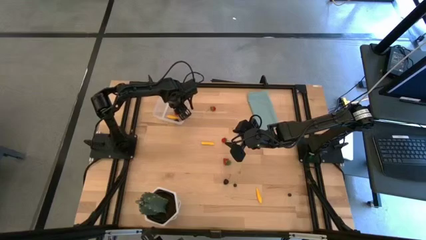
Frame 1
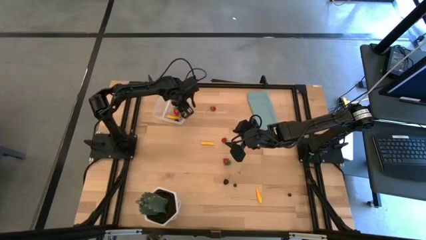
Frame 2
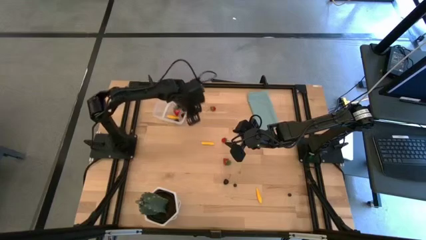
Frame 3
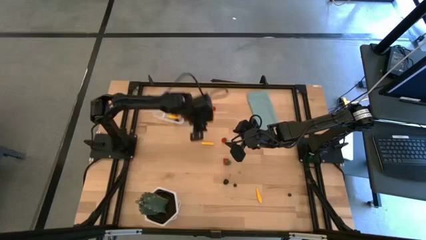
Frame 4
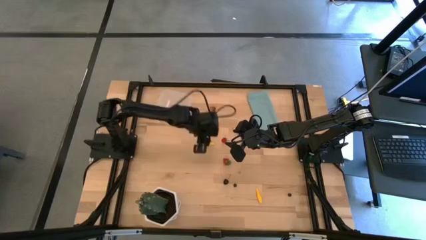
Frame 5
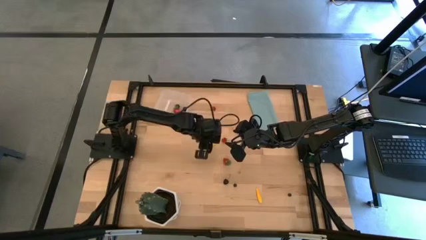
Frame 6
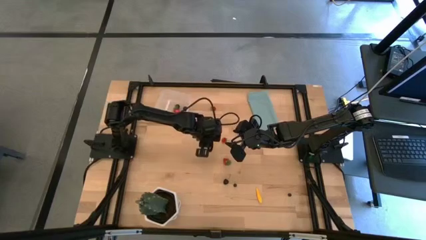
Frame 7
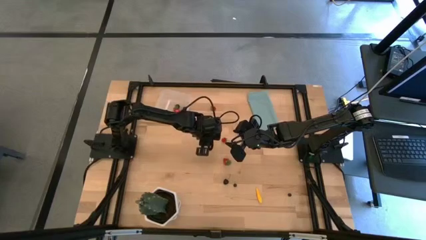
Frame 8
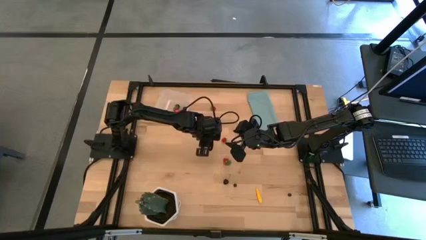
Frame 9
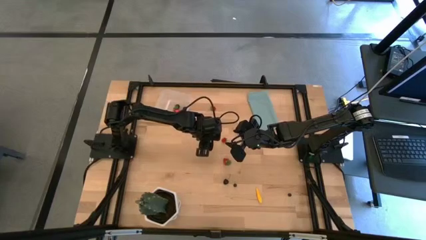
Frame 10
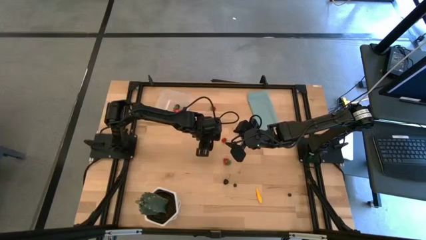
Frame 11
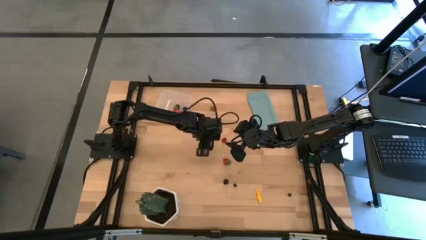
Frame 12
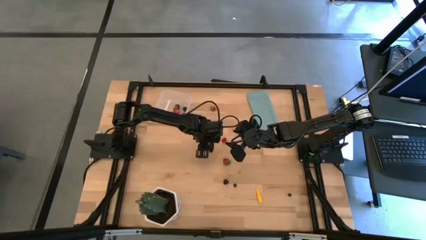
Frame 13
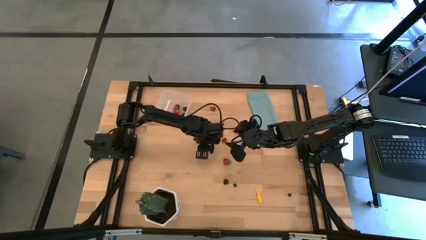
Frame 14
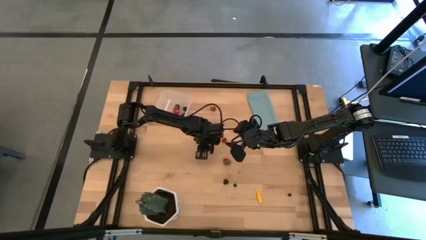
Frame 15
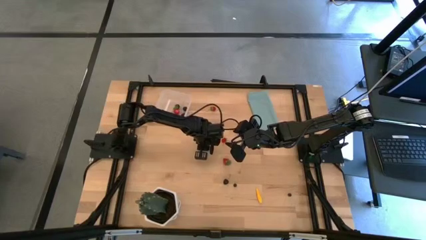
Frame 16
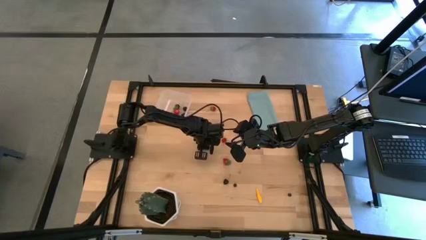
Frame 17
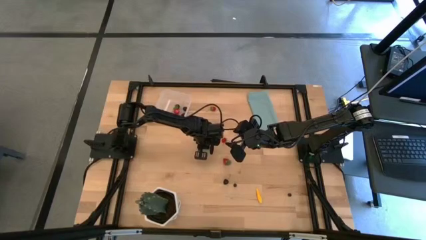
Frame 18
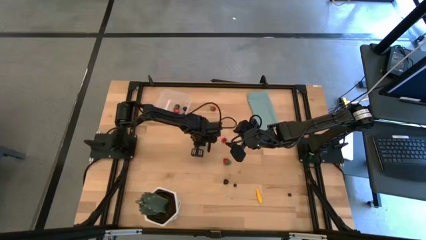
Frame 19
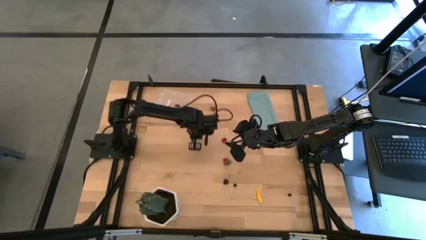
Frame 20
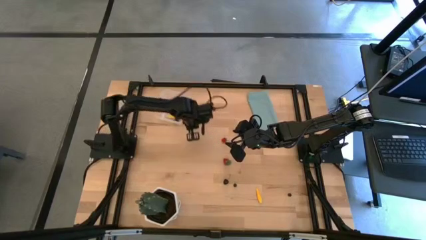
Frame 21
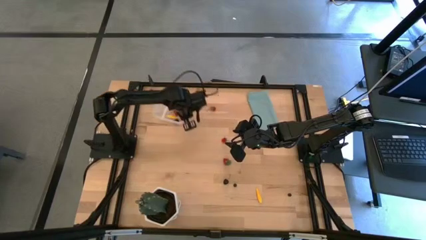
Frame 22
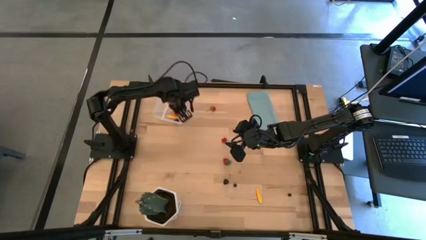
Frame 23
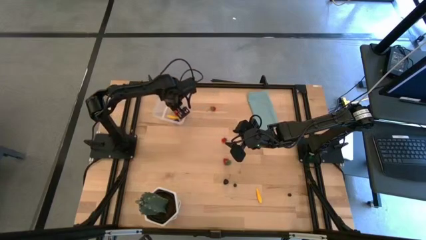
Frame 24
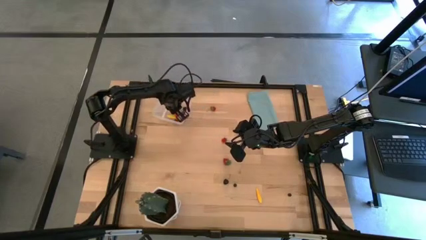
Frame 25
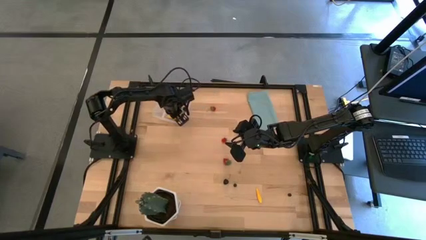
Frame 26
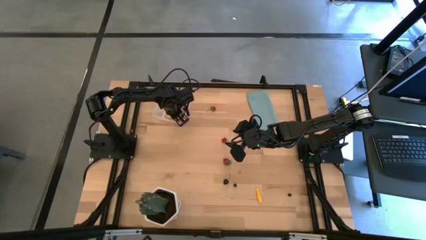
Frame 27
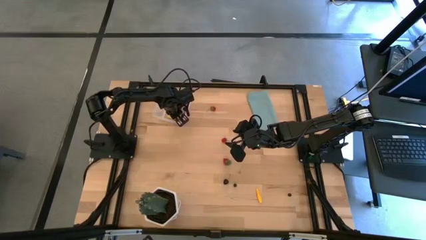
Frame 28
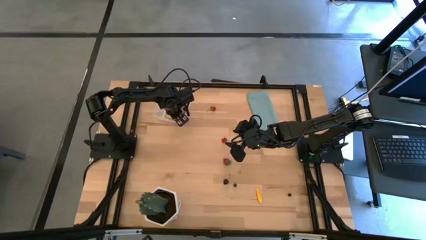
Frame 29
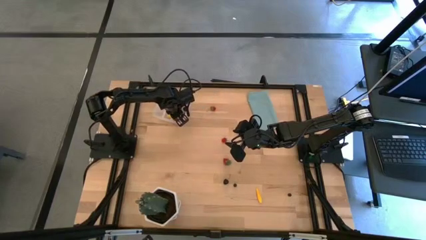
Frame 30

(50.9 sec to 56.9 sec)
Task: Pick and placing Produce into tupperware
Put the yellow corn into the transparent bin

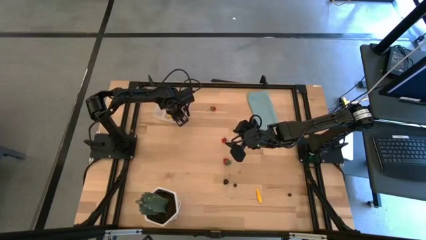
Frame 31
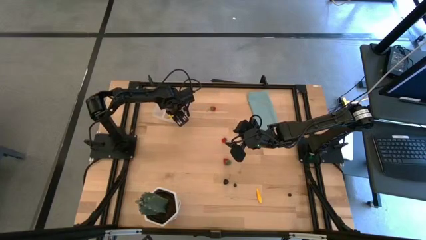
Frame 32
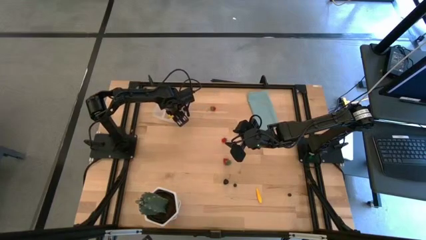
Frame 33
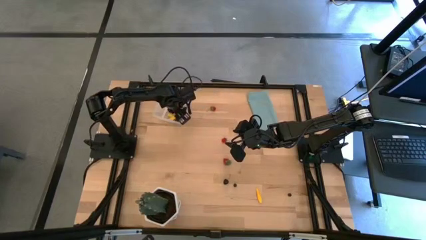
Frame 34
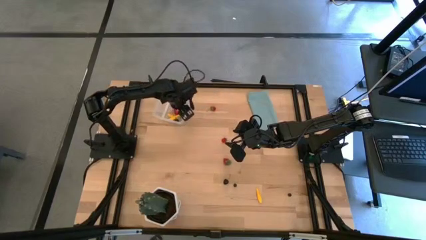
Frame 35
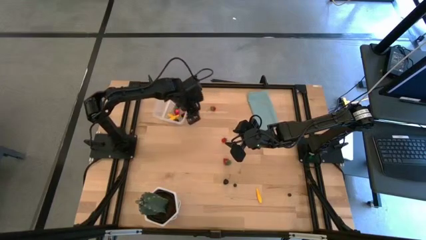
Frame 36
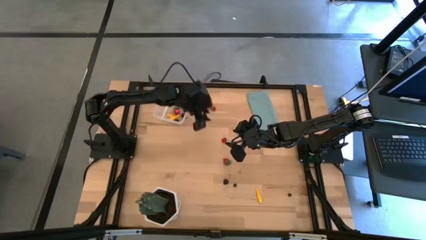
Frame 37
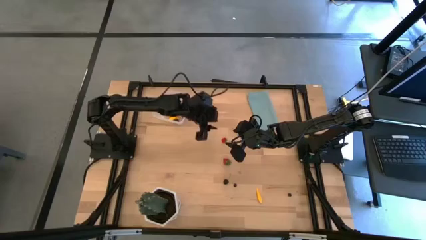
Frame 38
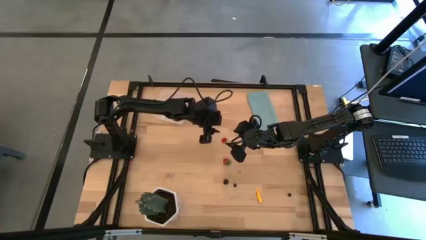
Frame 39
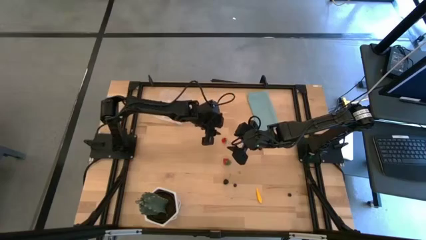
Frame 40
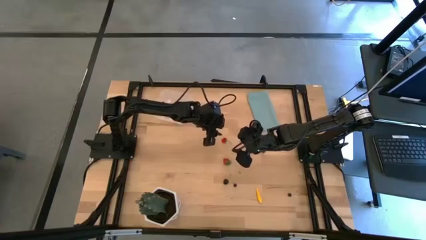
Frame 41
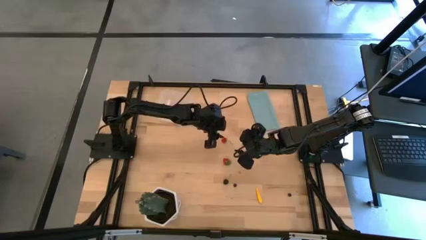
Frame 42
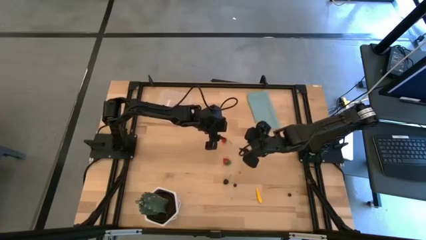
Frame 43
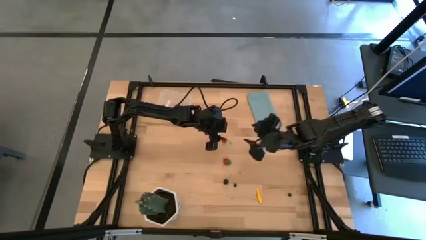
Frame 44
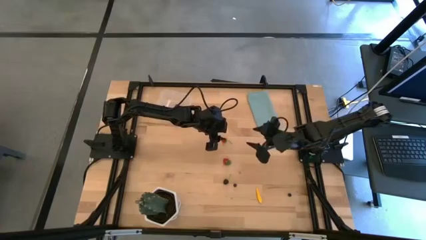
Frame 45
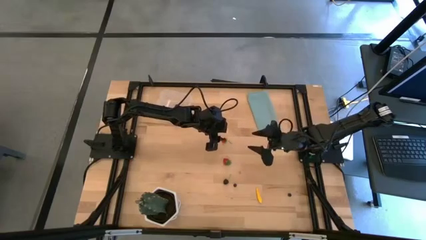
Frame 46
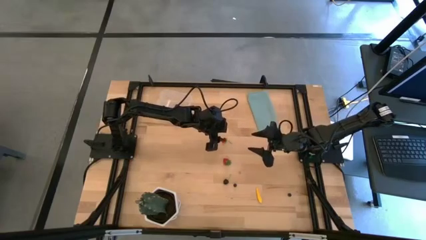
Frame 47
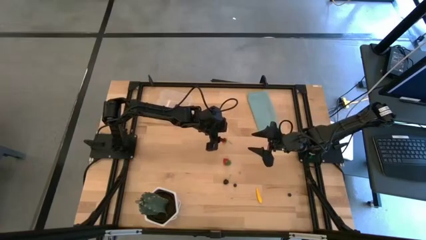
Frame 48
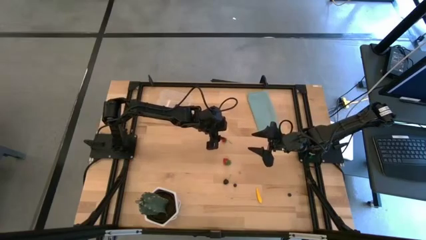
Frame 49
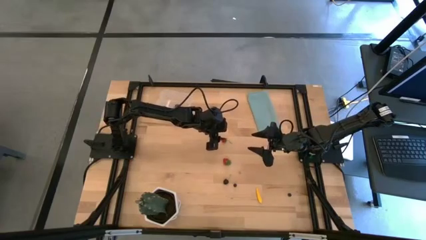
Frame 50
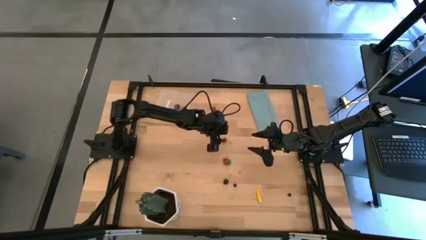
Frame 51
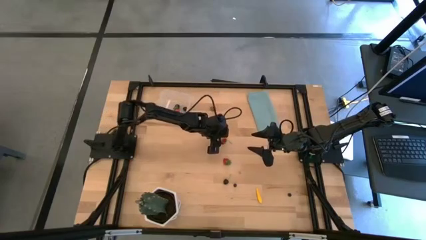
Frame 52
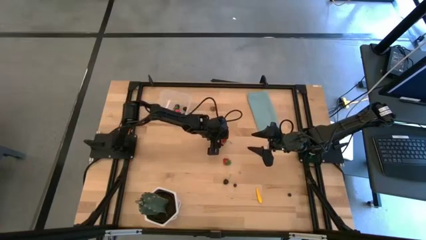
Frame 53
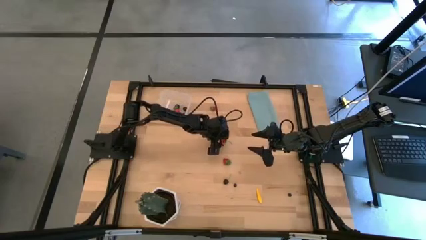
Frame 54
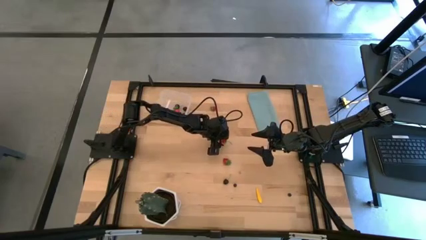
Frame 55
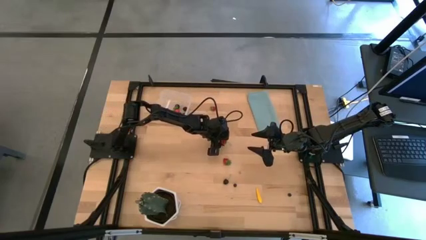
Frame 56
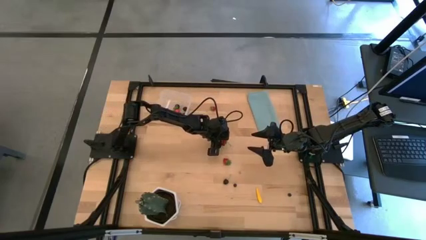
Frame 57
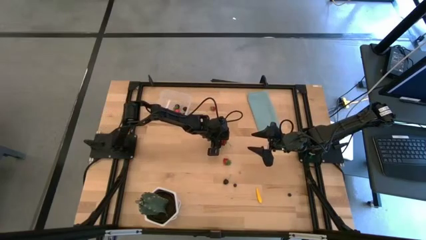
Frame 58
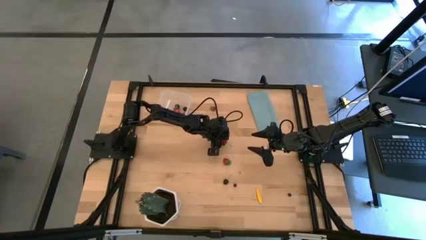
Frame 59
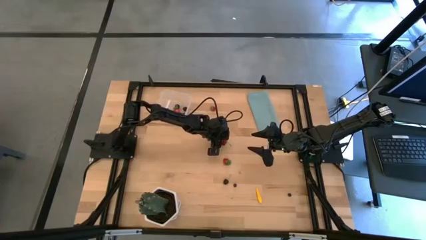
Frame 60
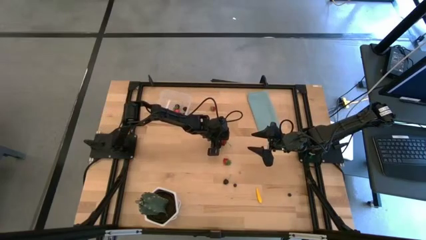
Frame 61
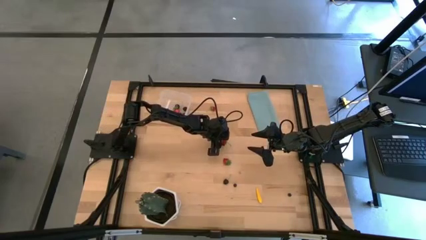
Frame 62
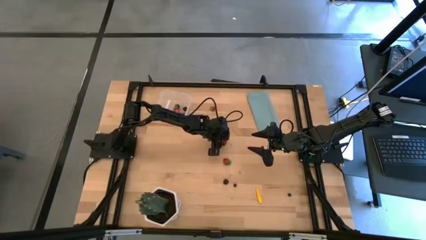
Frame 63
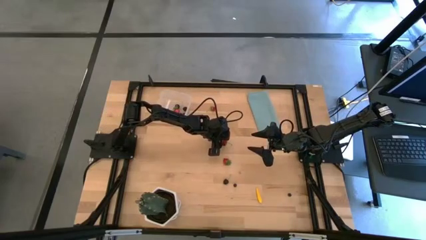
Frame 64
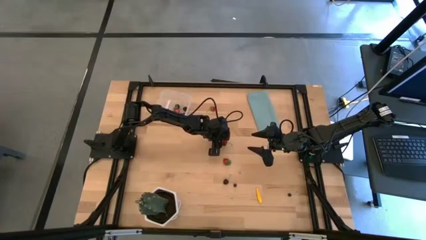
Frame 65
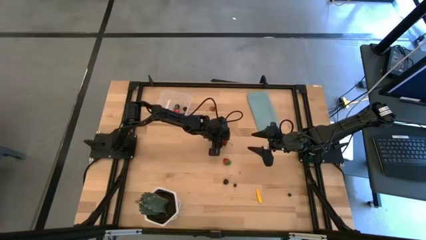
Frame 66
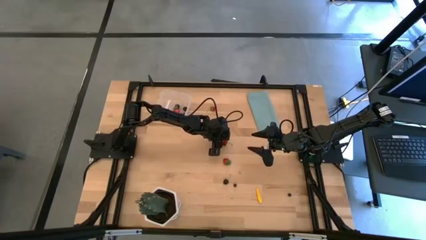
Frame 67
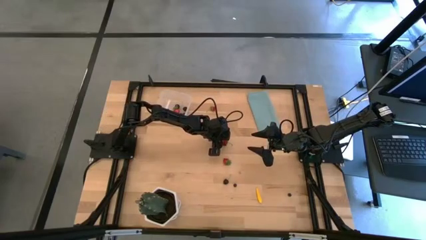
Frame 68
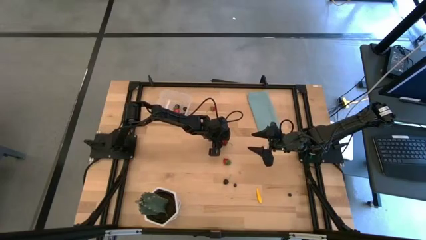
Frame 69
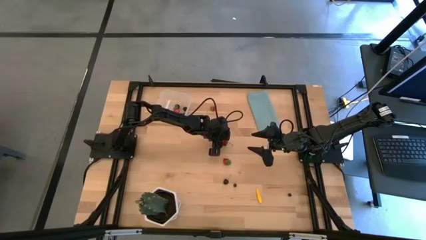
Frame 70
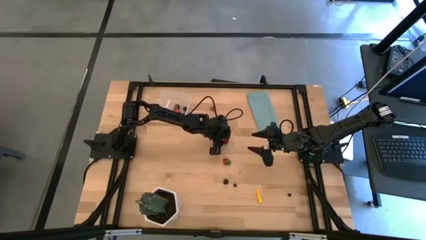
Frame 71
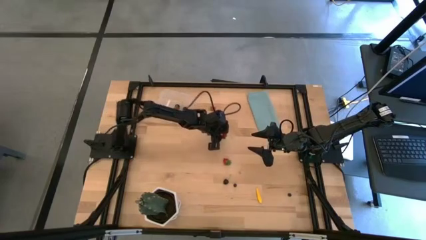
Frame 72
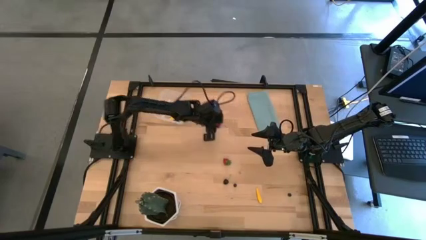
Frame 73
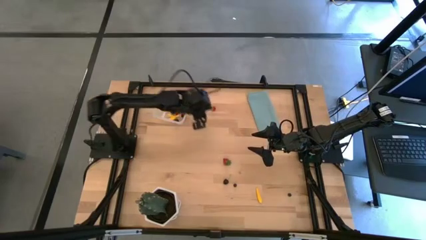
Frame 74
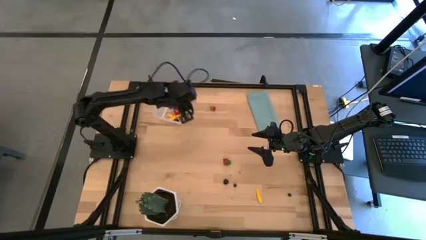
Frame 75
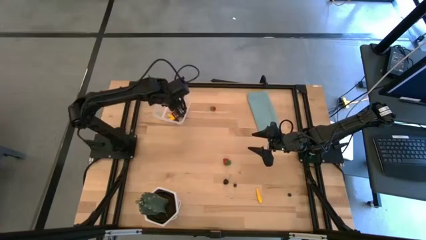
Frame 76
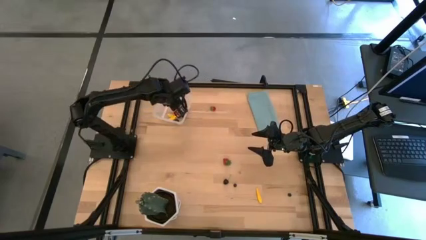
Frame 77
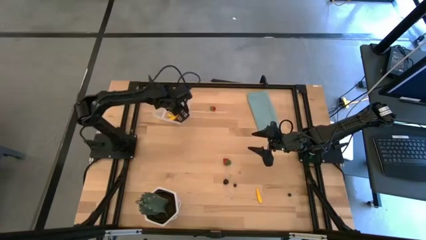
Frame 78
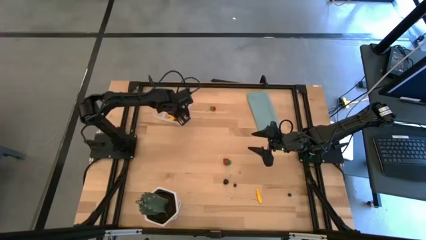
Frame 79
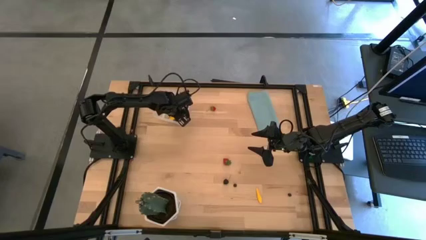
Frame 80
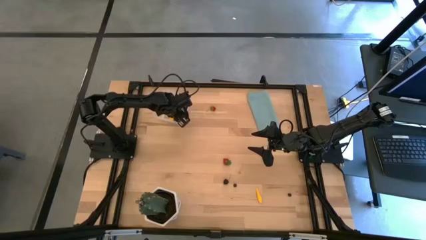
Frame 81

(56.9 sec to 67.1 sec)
Put the red strawberry into the transparent bin
